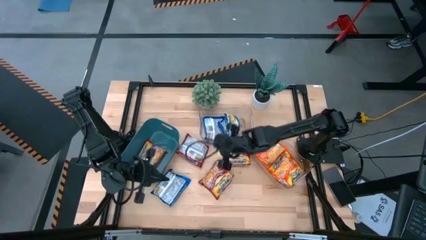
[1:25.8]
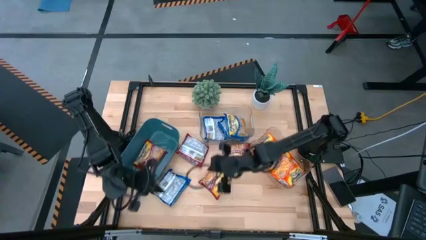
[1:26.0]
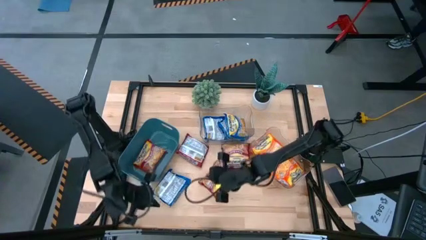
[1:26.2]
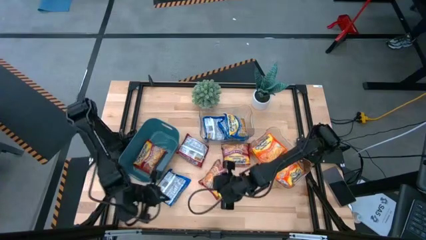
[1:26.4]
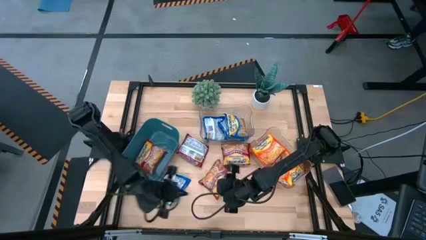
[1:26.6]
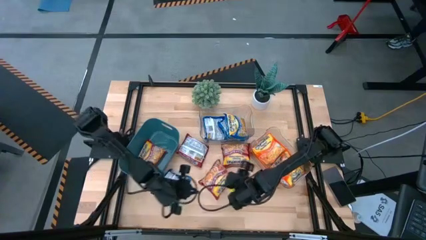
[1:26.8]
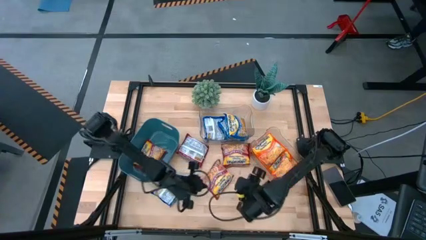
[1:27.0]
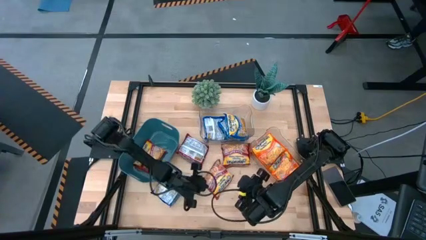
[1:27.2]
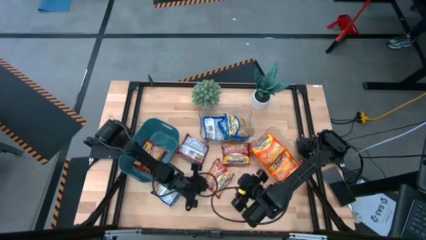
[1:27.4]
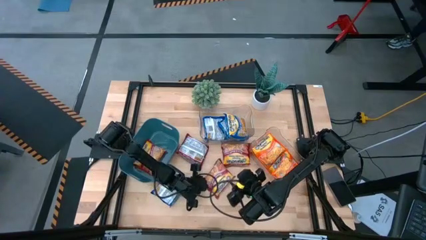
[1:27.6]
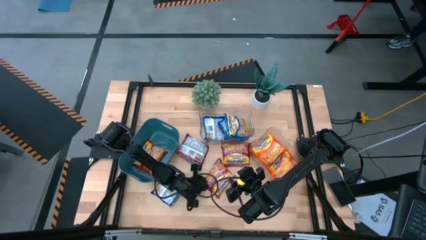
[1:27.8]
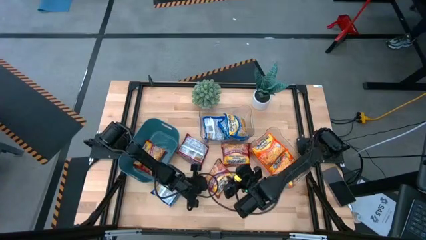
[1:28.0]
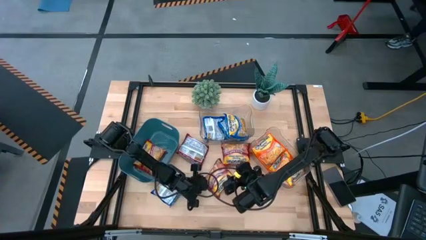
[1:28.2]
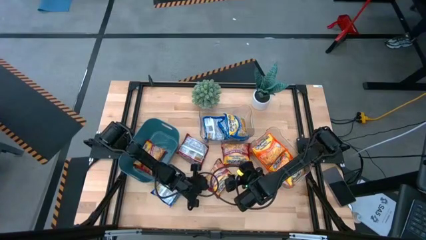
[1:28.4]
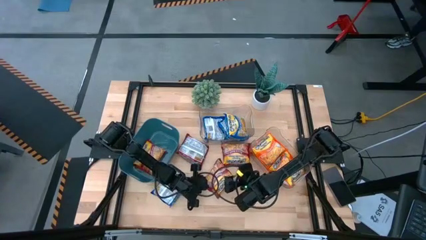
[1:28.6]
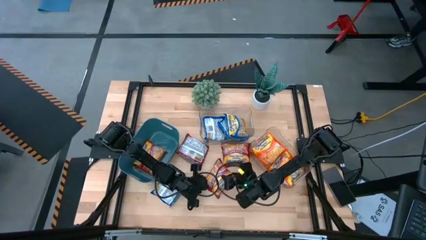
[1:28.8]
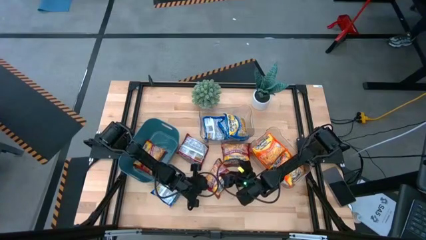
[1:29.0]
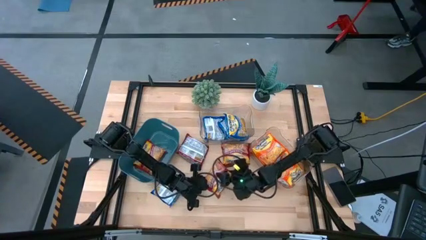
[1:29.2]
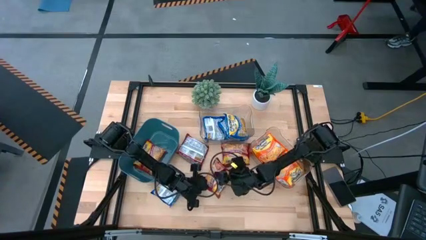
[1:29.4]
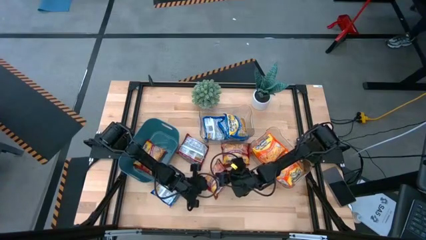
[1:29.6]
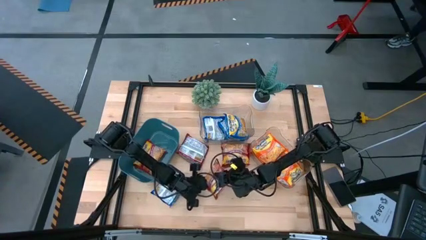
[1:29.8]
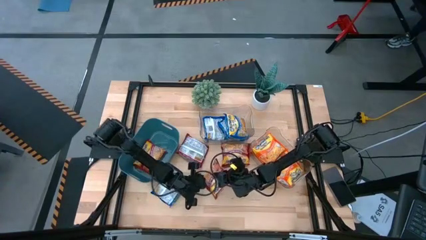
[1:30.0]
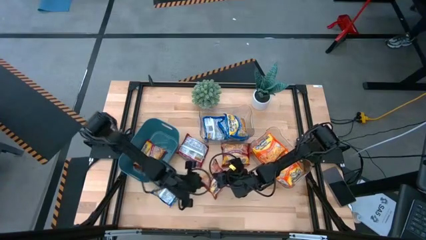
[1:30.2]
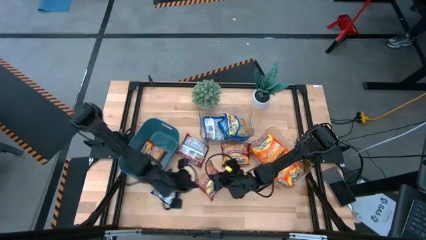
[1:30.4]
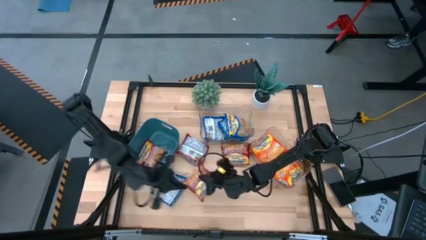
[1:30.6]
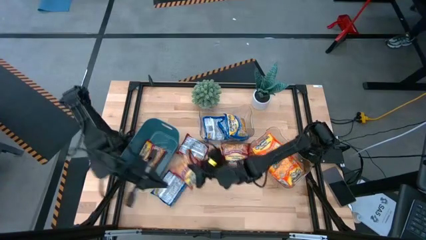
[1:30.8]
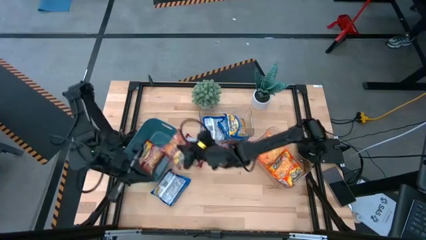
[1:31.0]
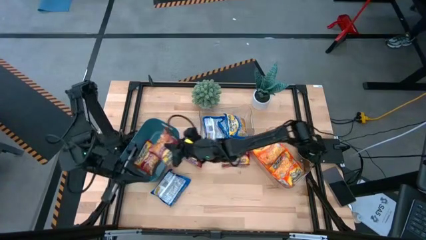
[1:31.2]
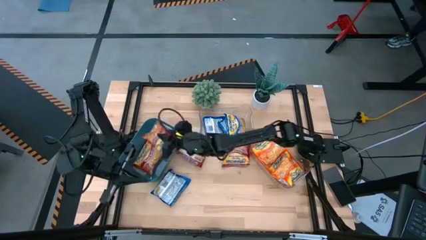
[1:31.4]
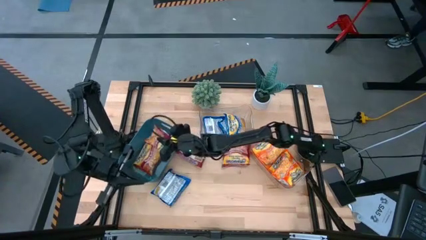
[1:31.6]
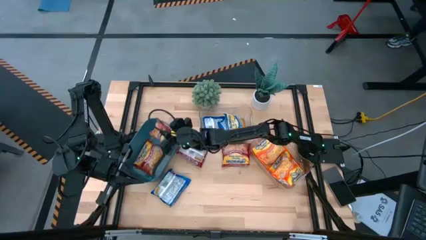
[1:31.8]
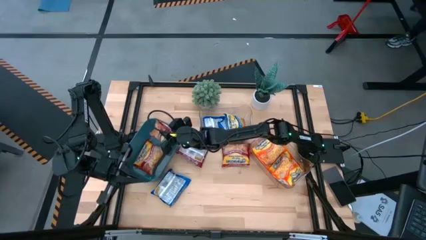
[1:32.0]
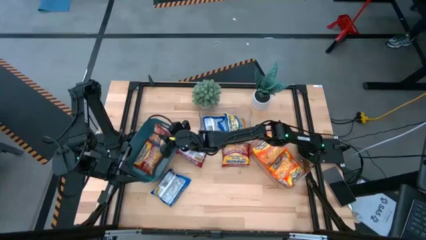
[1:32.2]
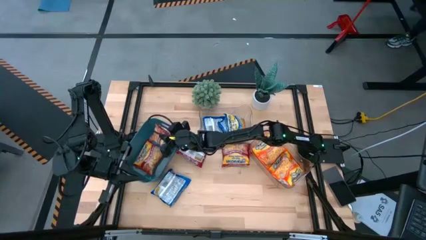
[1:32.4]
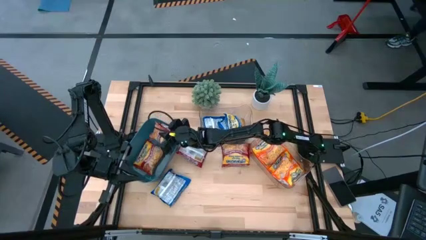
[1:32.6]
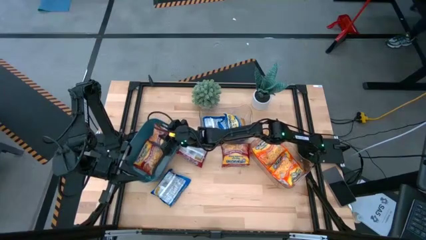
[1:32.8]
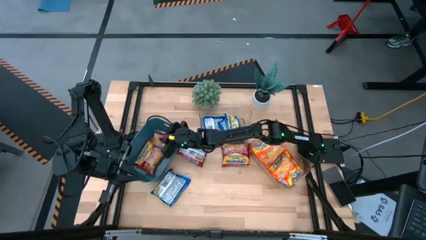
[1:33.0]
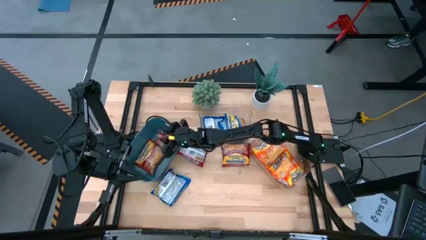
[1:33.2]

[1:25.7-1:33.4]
Task: Sort Maruchan noodles
Put the bottom red noodle pack into the blue bin

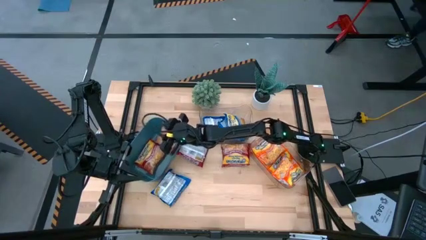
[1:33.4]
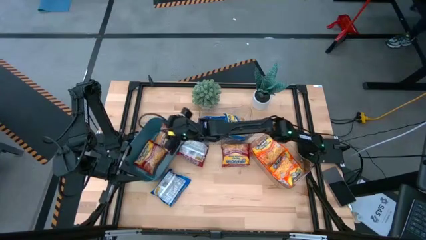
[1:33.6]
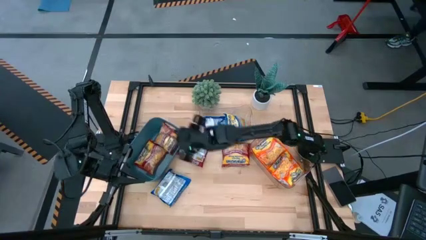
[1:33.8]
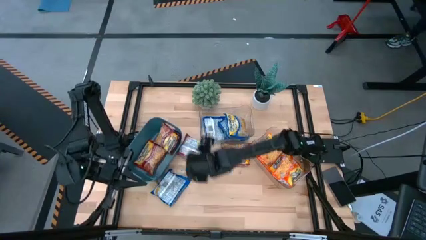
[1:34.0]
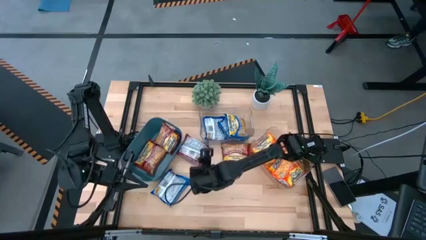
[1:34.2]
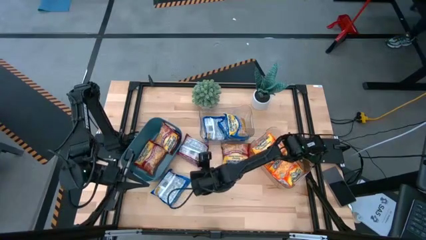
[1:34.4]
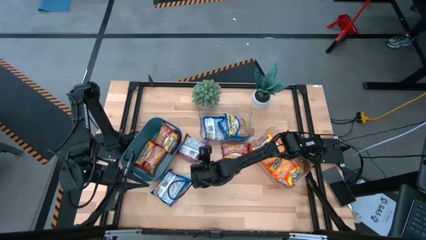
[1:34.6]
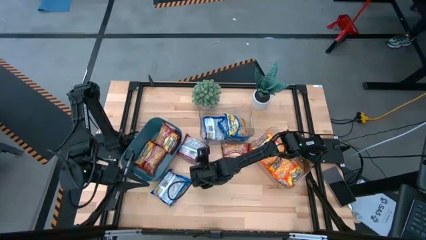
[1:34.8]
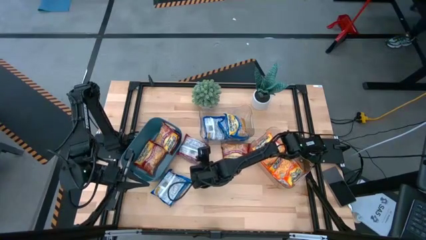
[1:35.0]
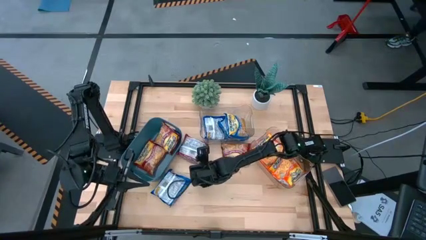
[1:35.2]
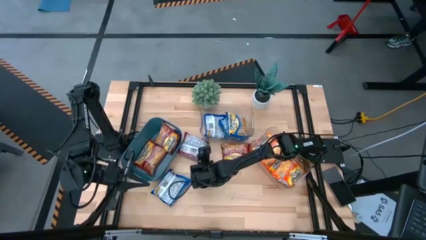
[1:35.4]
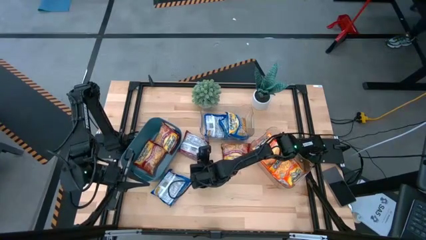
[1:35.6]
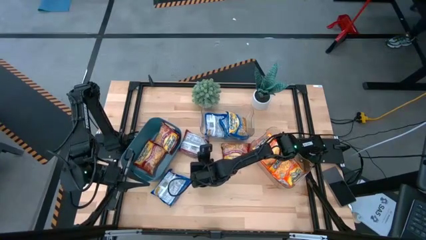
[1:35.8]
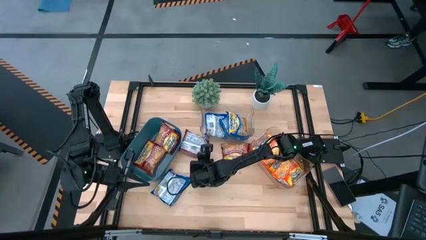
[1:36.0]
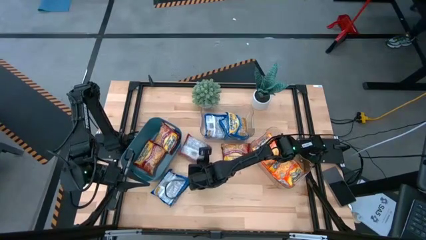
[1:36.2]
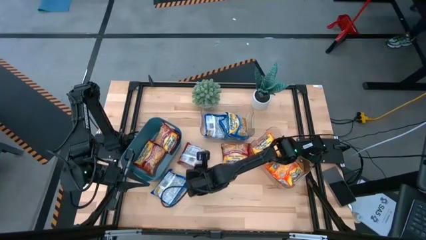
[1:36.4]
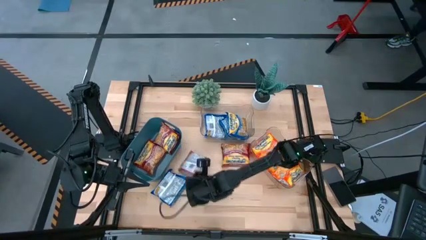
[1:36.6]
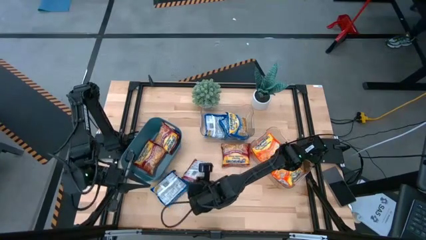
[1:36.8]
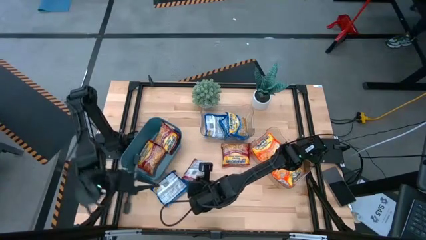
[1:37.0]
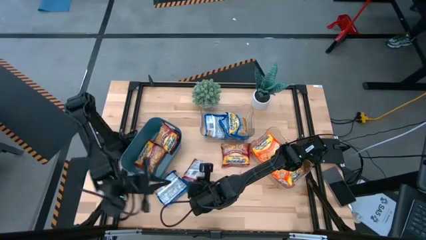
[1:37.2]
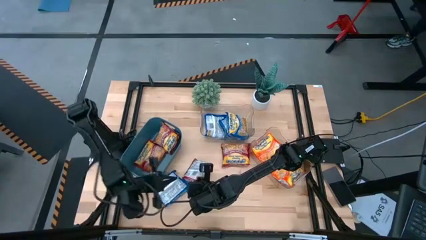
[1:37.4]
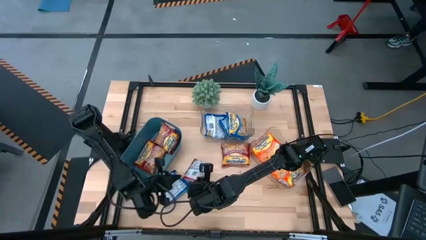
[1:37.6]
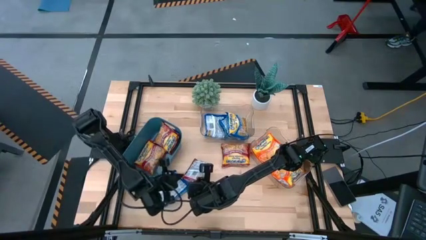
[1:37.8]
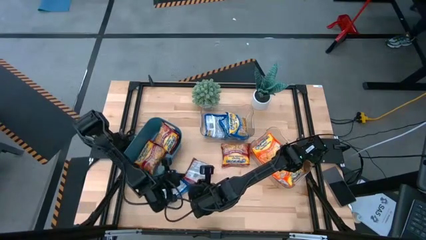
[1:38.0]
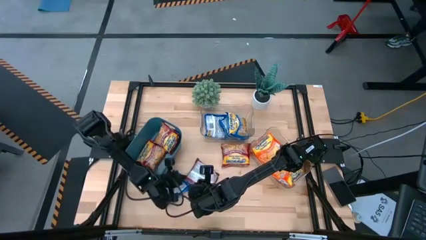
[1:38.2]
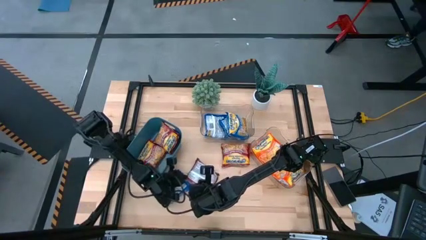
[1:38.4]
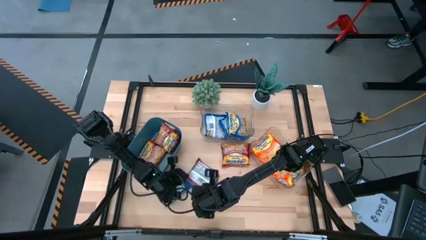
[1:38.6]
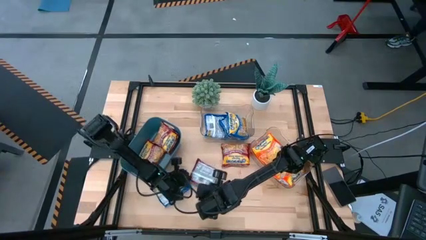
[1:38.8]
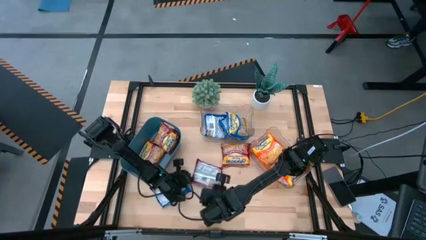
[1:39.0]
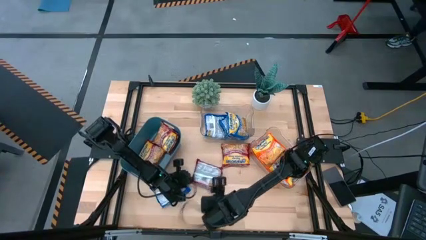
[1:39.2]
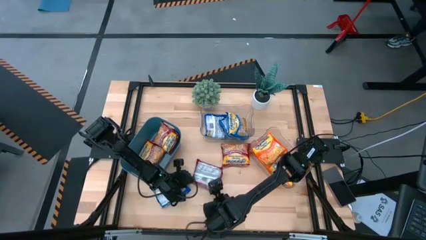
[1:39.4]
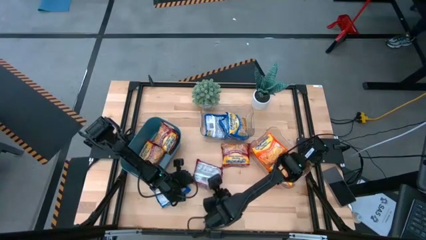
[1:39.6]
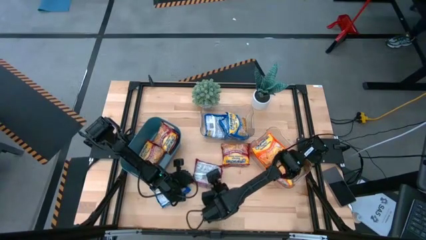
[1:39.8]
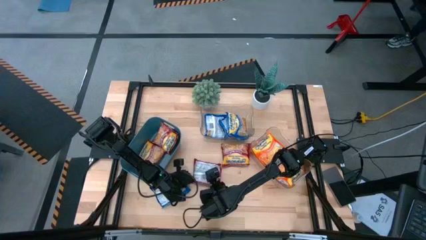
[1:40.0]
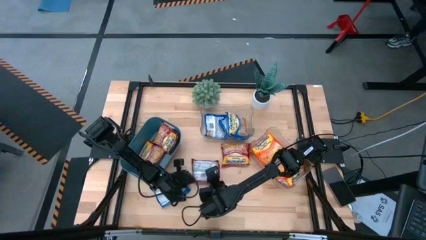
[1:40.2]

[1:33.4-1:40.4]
Put the left red noodle pack into the blue bin

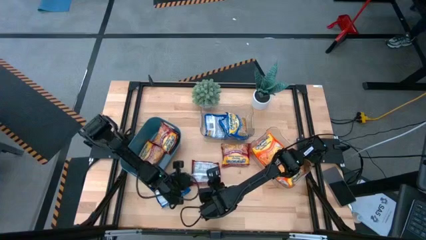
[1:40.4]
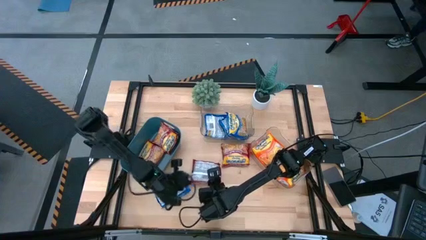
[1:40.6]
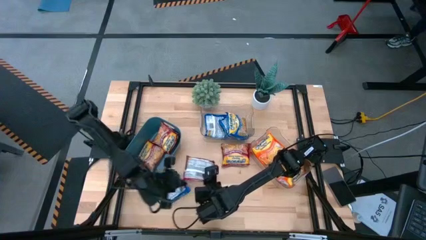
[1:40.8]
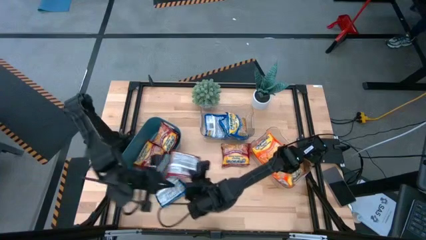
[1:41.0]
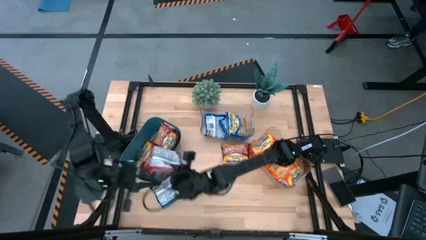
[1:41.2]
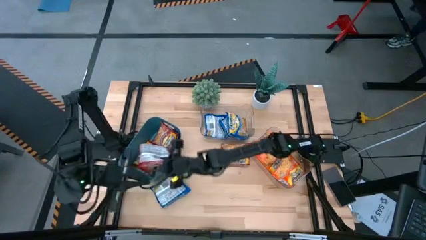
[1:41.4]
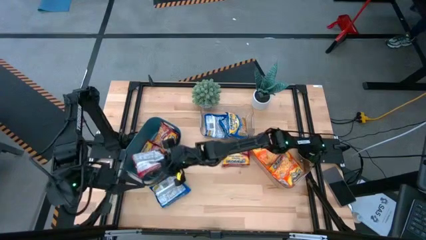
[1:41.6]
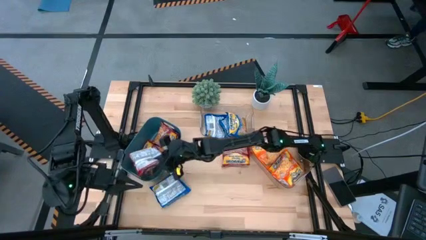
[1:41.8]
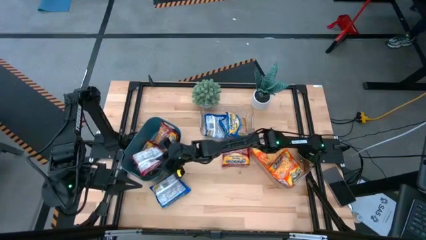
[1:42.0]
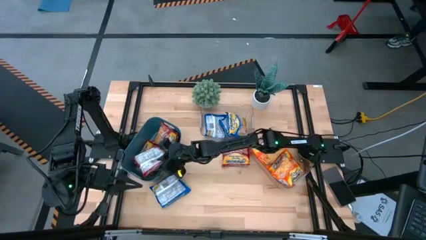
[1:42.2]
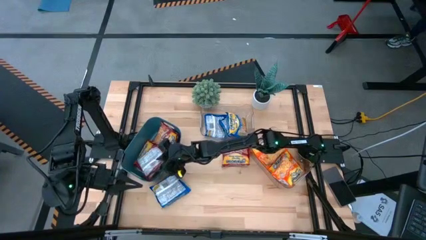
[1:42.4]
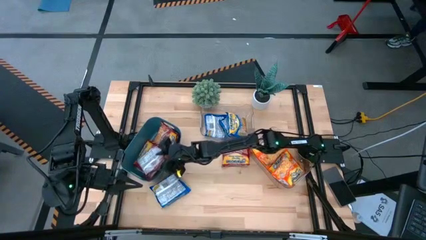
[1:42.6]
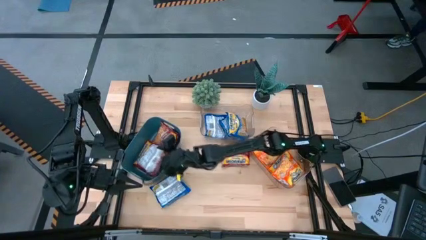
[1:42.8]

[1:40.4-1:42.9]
Stack the left red noodle pack on top of the red noodle pack in the blue bin
